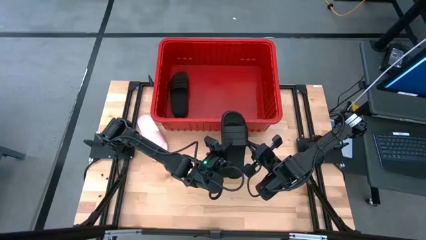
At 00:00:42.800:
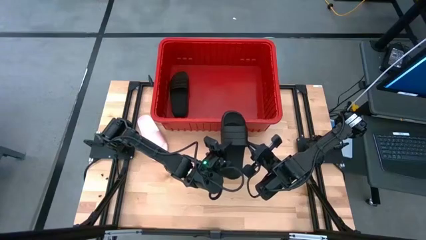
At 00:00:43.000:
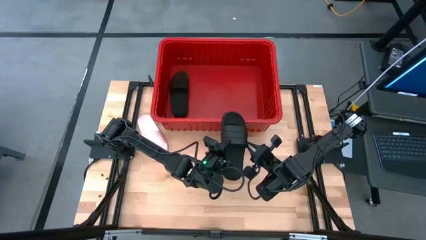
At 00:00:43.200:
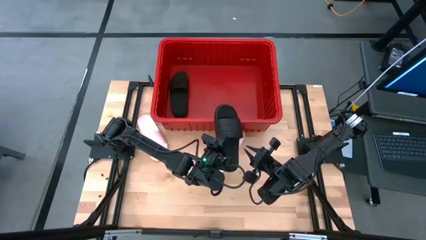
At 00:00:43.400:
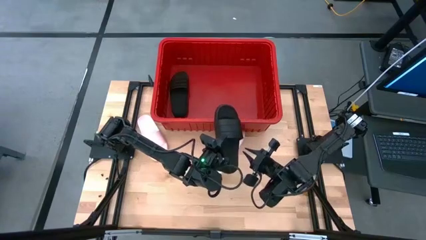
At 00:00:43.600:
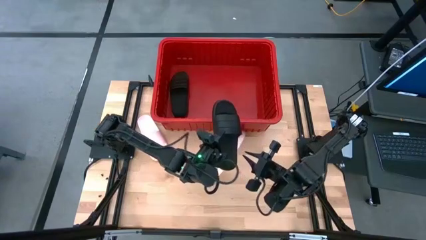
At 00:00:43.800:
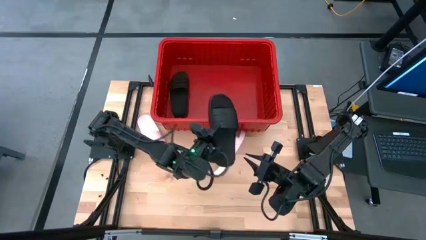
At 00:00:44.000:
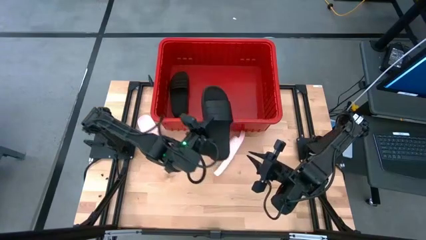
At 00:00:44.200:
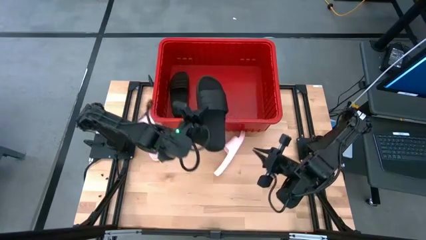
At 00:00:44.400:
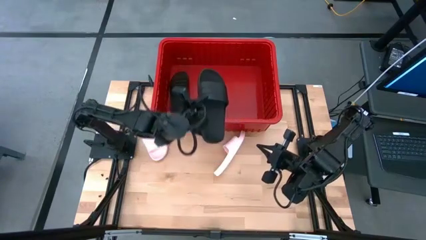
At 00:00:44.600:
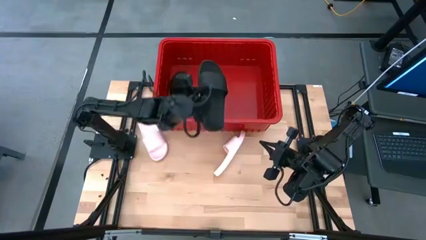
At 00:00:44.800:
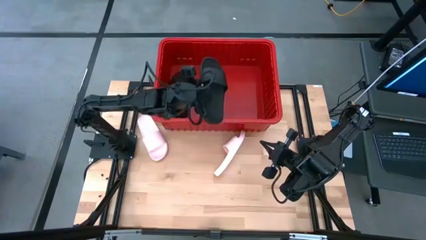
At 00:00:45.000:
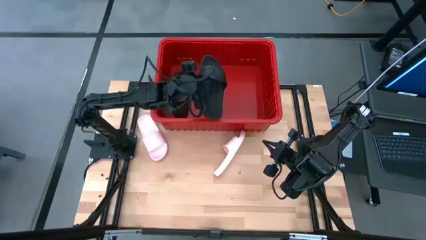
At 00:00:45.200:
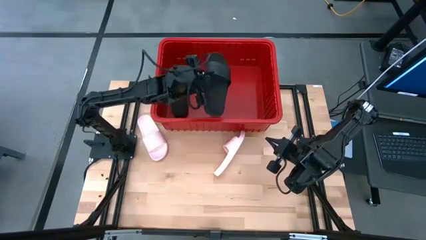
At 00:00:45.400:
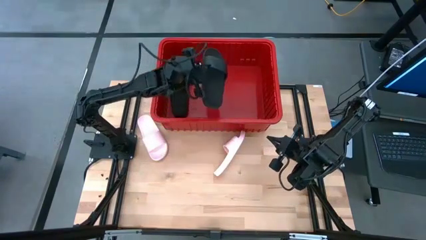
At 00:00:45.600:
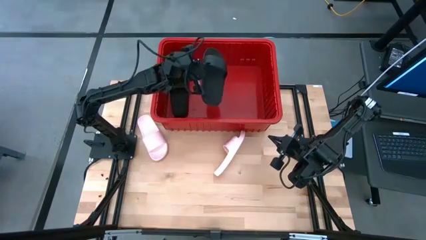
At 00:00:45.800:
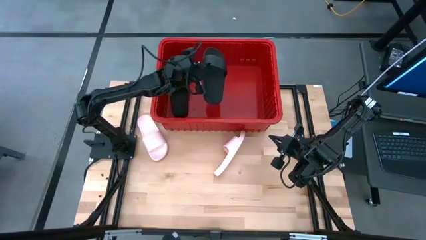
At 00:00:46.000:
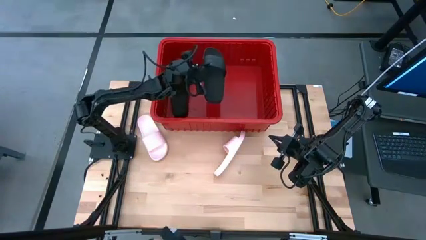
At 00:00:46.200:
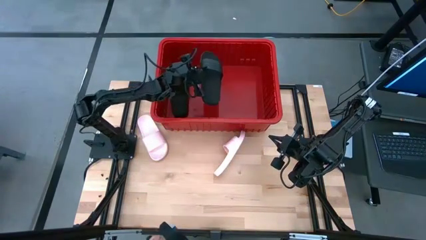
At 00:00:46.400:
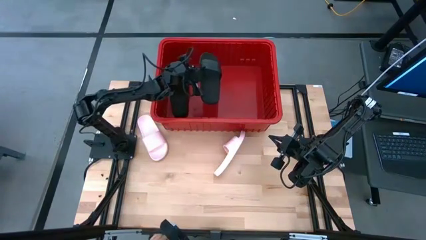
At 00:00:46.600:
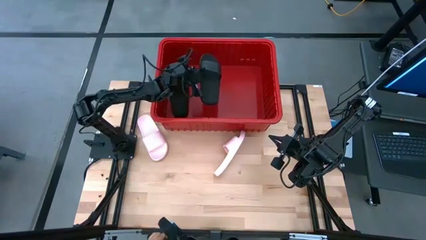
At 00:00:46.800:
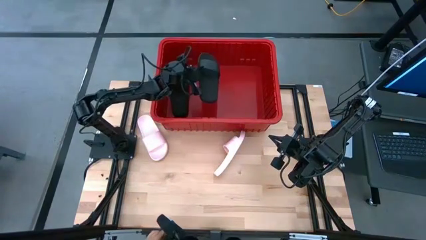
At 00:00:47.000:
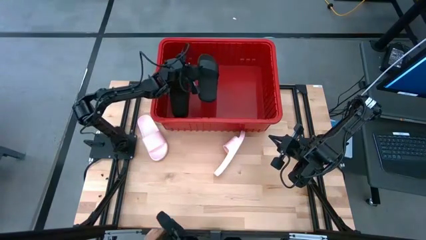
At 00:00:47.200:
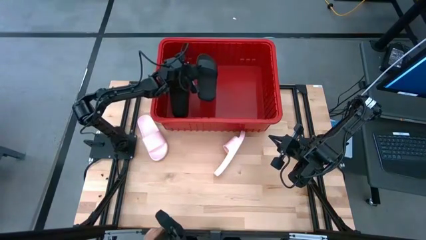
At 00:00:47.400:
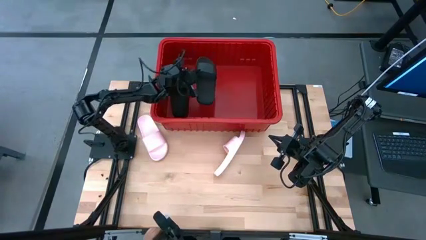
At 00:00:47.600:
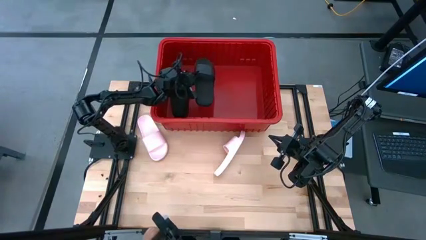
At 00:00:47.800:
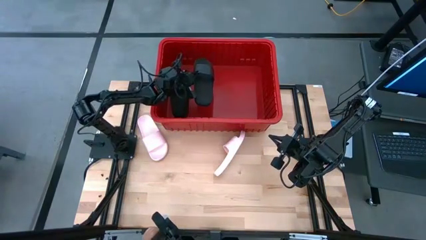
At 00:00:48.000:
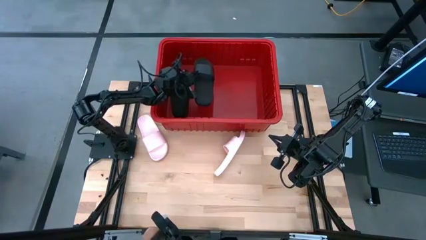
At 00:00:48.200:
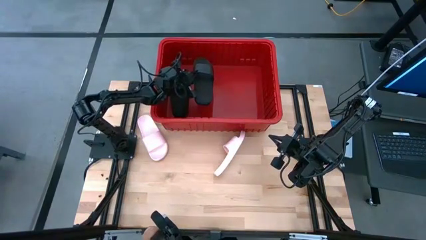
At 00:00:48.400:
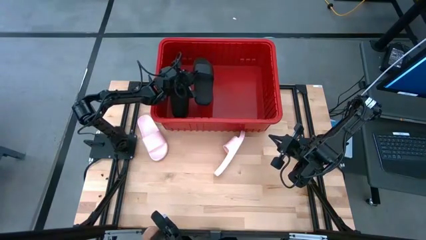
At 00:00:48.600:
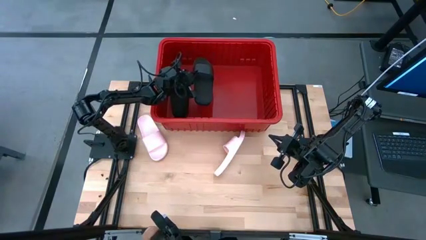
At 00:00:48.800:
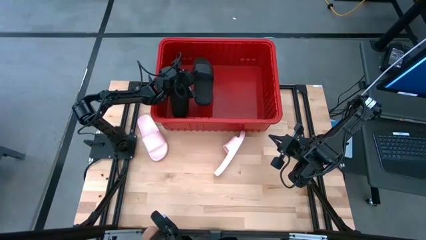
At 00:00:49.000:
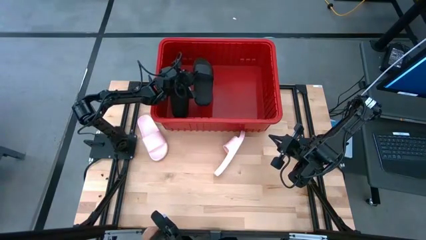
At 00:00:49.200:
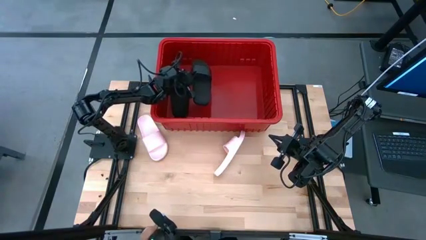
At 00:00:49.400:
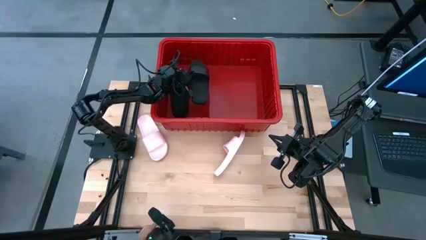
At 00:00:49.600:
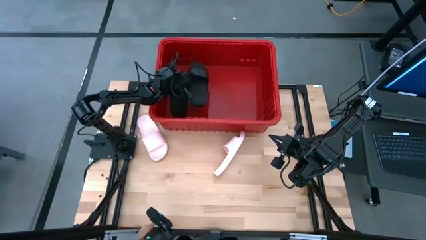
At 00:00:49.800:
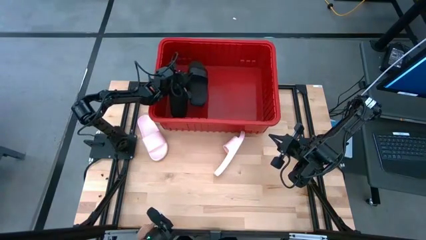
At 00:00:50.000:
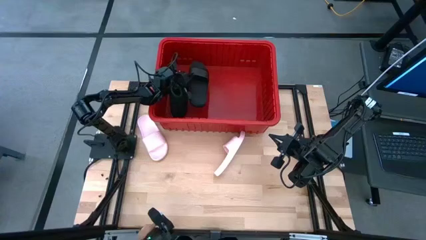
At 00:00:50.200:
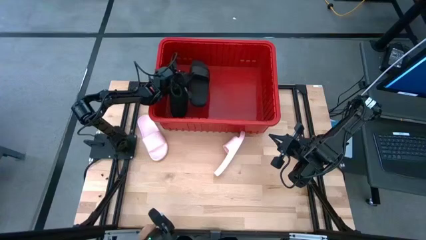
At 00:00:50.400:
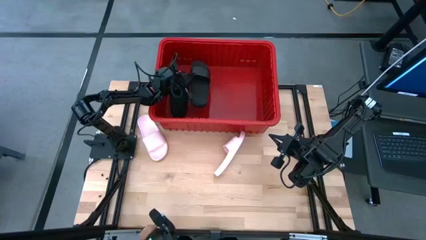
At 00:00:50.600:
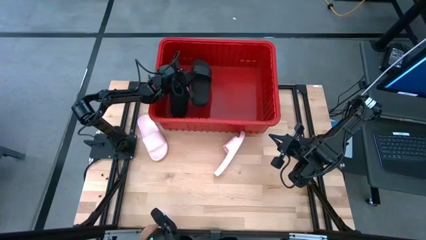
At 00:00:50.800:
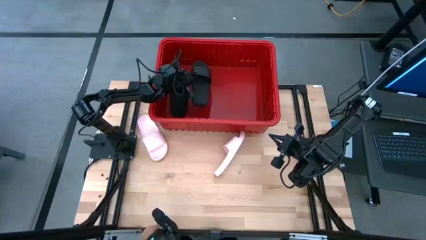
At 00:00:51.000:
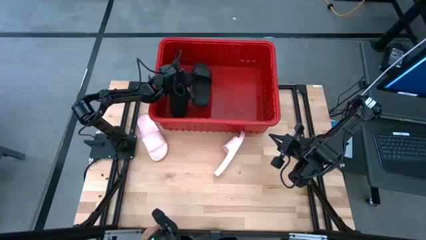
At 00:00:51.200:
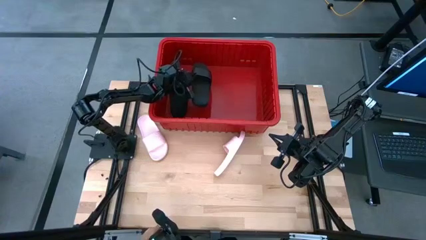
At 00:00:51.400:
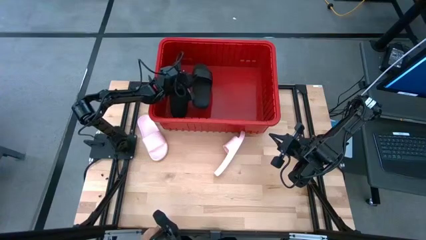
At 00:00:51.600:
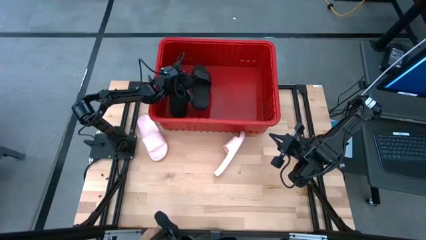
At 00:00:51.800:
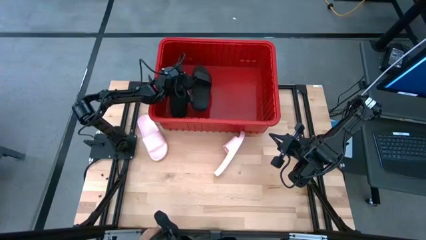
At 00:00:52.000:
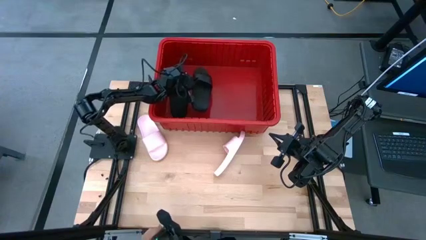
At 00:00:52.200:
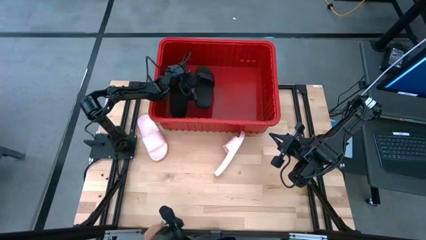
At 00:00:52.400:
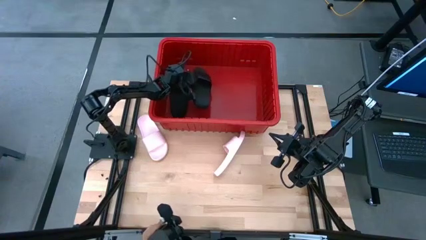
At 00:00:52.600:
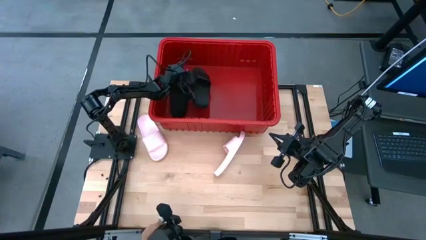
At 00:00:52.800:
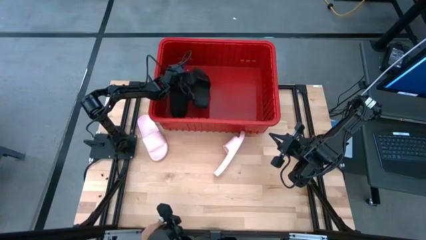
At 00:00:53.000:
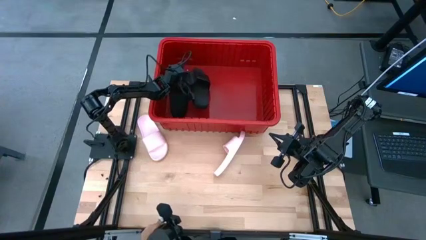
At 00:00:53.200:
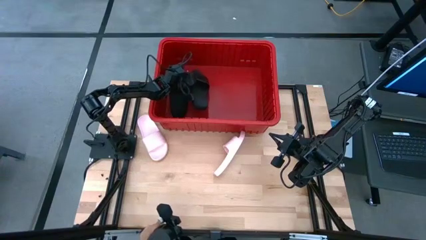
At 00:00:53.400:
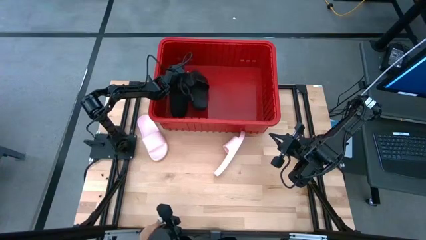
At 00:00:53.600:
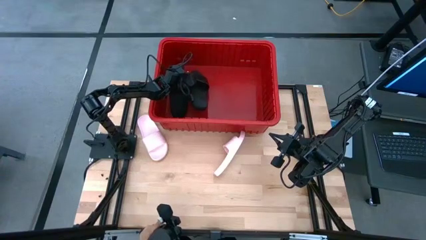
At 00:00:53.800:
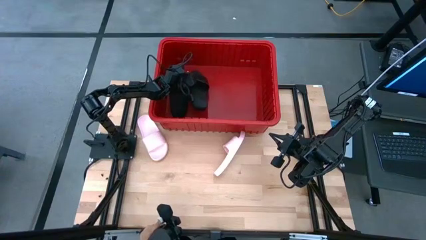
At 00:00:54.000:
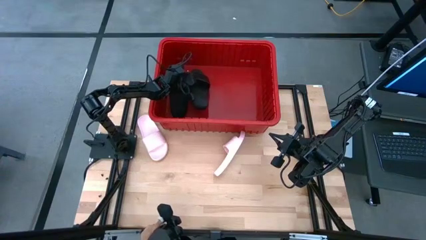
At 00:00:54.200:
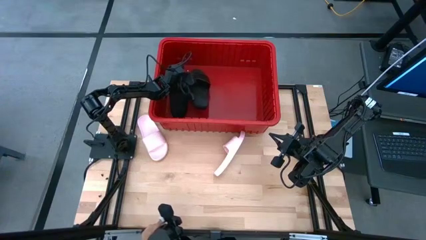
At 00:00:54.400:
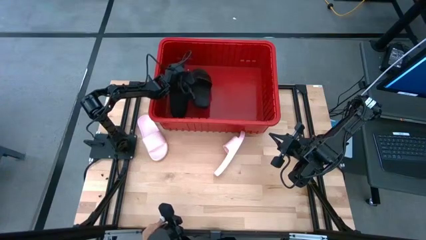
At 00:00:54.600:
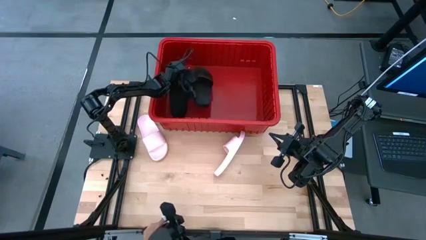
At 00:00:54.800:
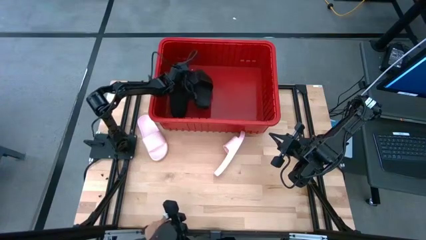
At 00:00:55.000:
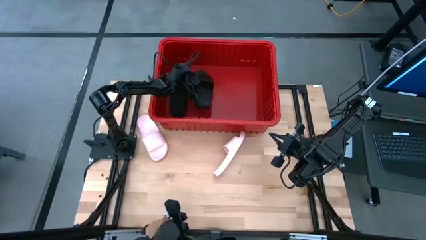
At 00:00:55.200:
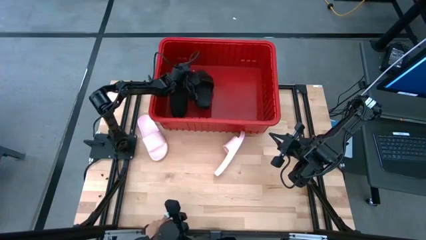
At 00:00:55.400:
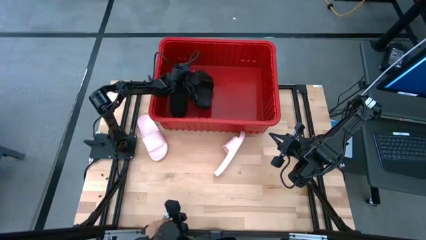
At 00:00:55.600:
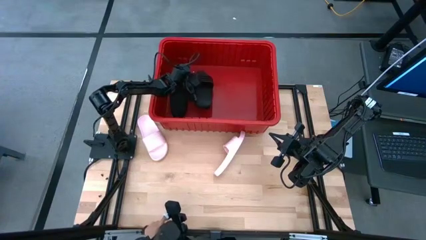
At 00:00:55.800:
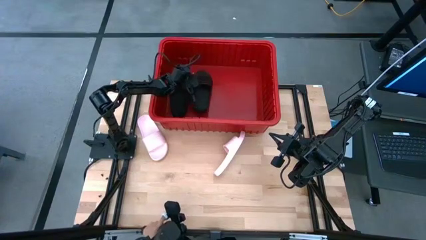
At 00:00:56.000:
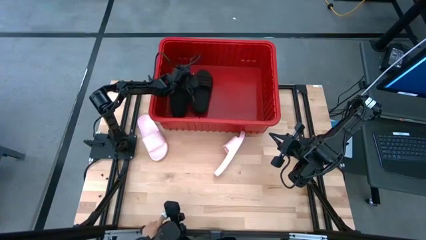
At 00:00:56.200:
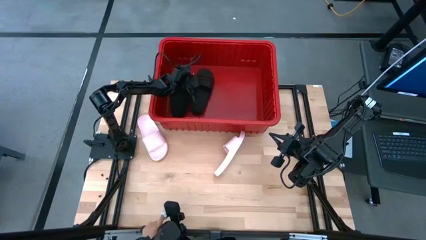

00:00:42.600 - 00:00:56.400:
Task: Pick and place slides into bin
Put the black slide into the red bin

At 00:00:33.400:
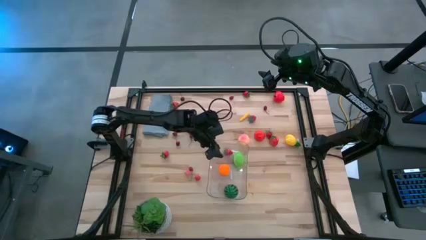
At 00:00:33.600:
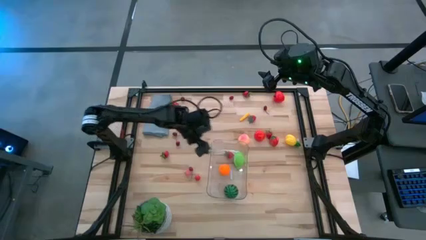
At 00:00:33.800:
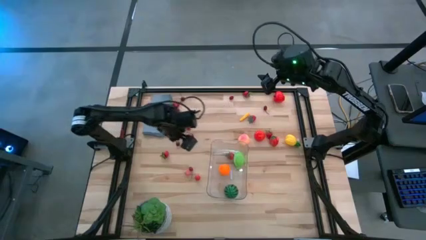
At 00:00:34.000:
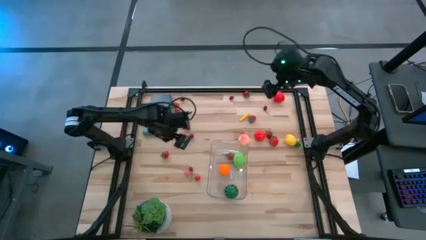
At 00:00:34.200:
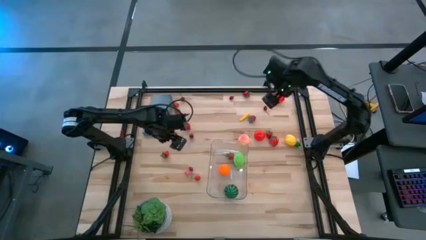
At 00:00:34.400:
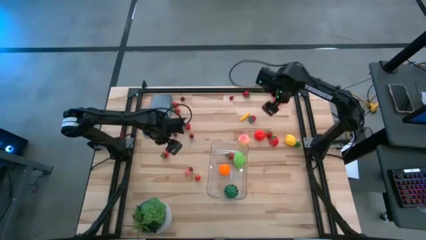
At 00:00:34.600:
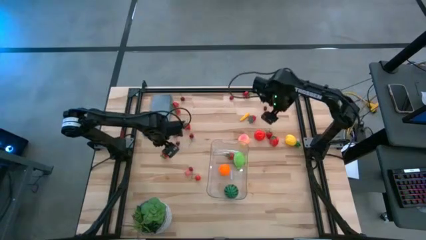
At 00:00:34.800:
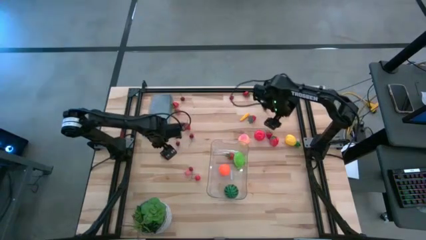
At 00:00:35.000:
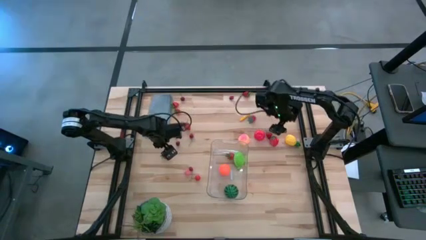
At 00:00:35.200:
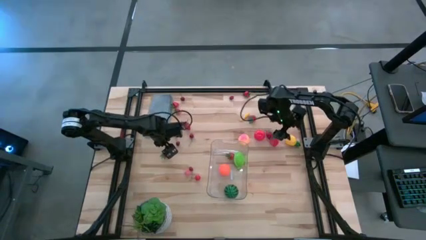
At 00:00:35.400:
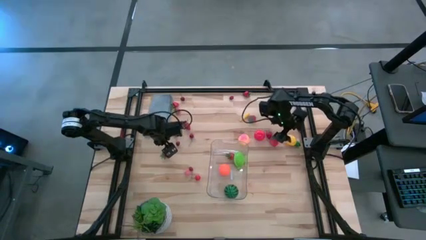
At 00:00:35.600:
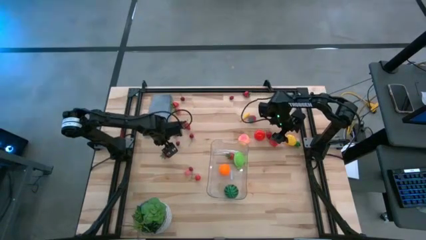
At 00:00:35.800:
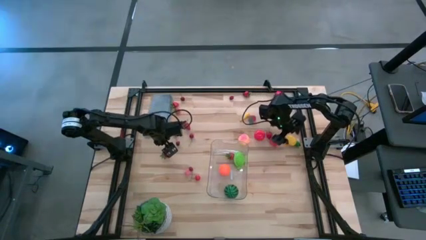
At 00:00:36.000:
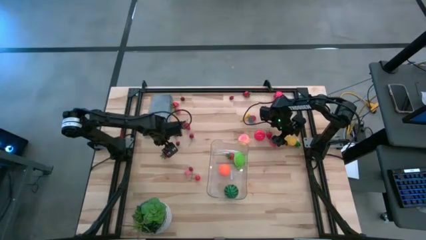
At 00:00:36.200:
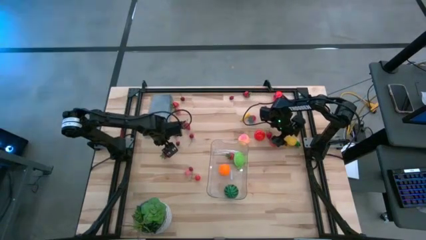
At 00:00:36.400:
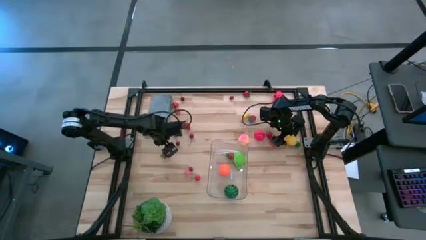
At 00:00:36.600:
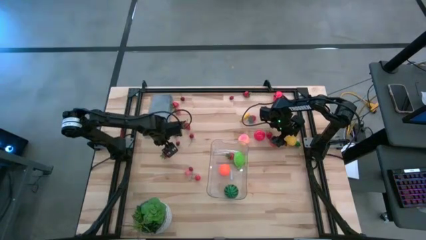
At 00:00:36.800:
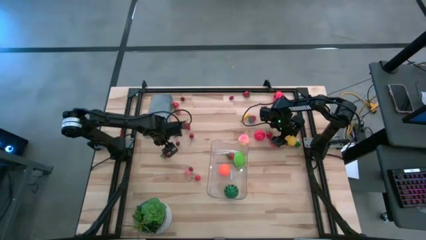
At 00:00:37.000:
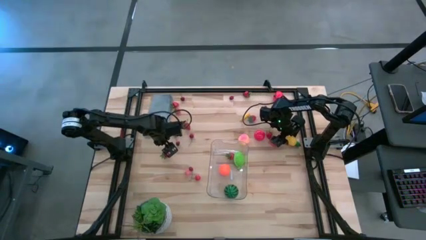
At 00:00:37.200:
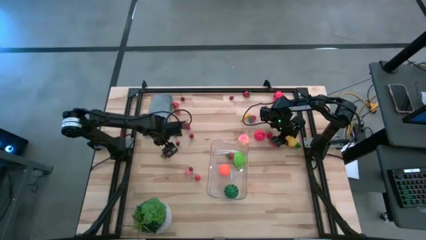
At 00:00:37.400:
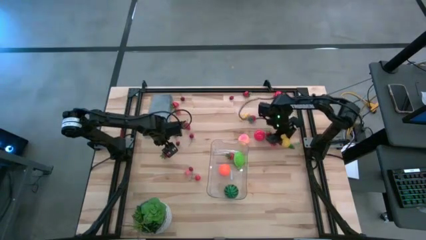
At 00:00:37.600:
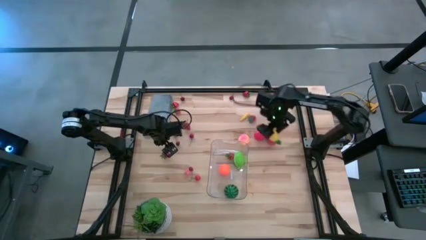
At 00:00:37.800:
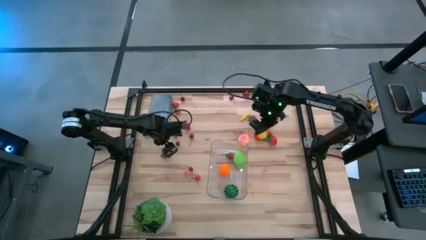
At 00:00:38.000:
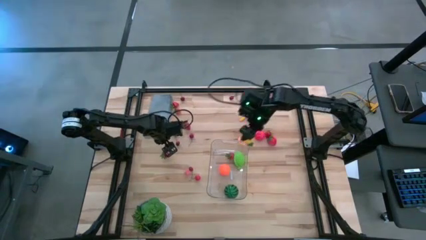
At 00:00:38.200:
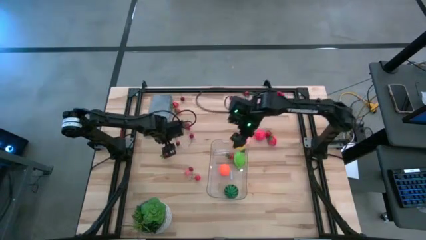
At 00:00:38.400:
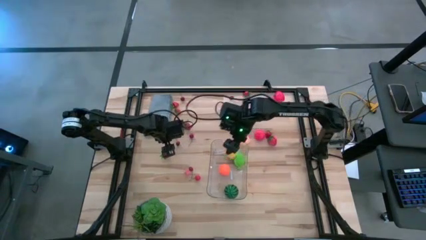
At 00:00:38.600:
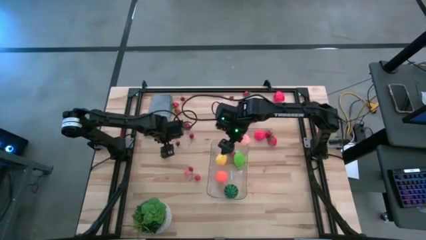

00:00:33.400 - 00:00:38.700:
Task: Pick and placing Produce into tupperware
Put the pineapple into the transparent bin
